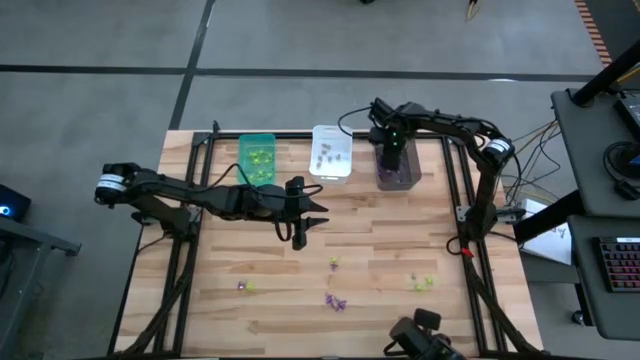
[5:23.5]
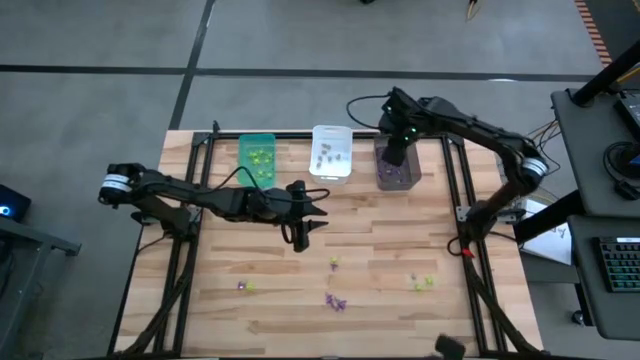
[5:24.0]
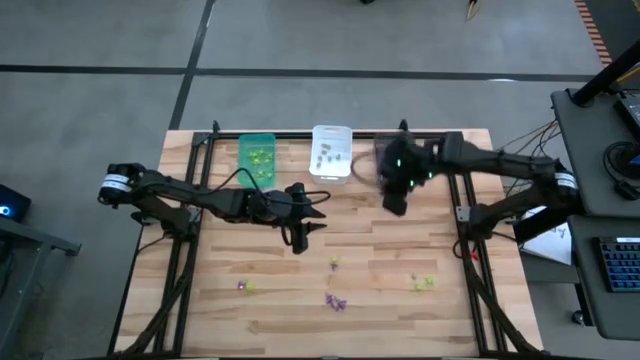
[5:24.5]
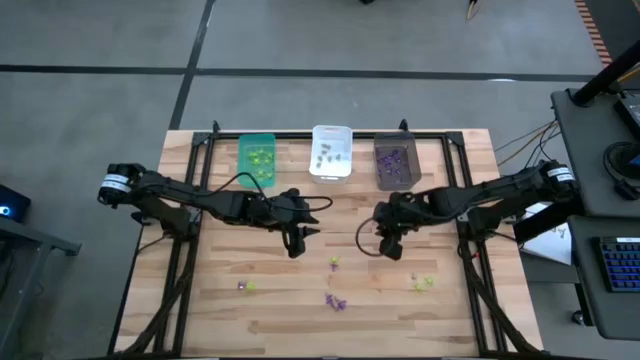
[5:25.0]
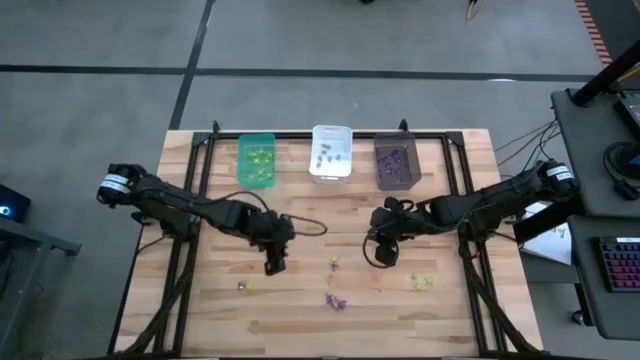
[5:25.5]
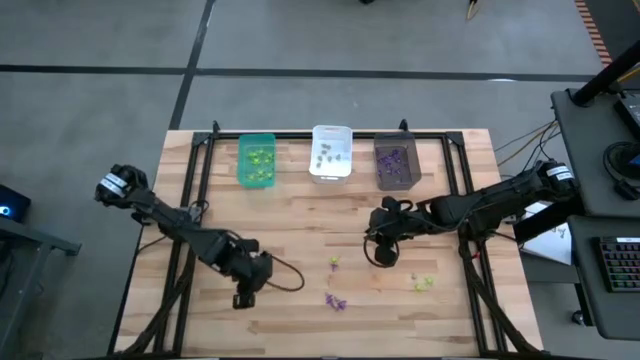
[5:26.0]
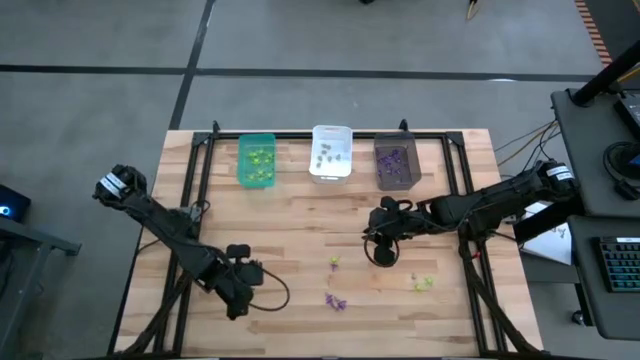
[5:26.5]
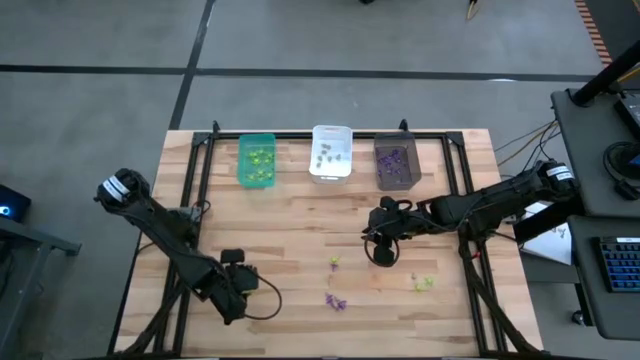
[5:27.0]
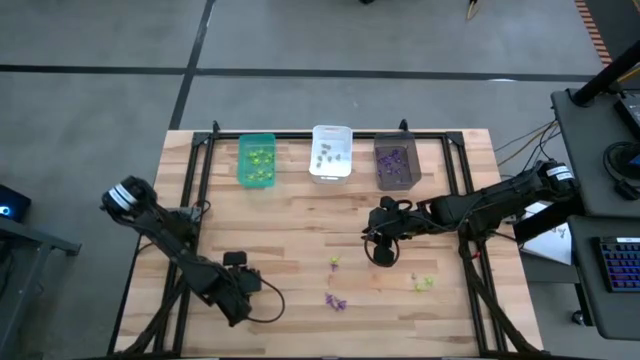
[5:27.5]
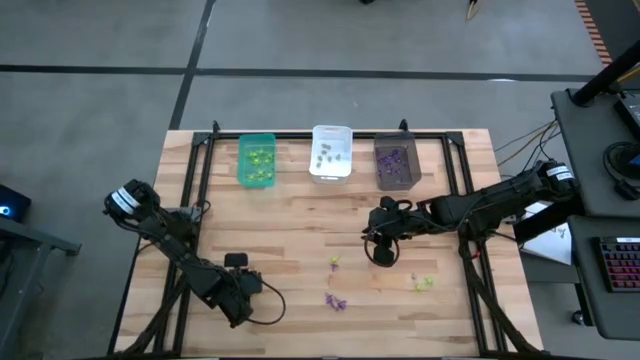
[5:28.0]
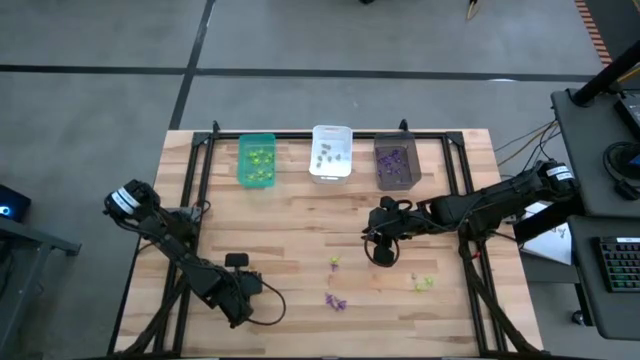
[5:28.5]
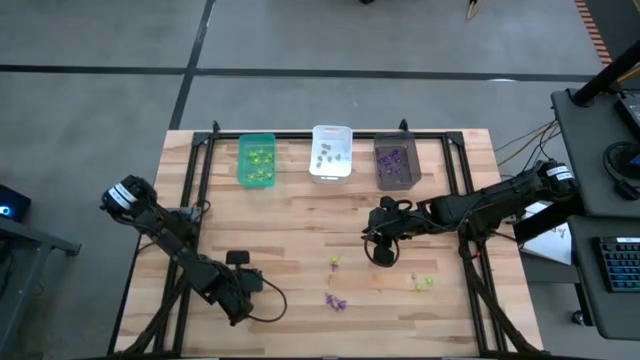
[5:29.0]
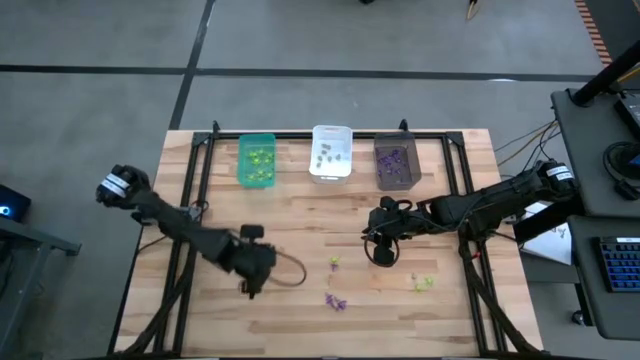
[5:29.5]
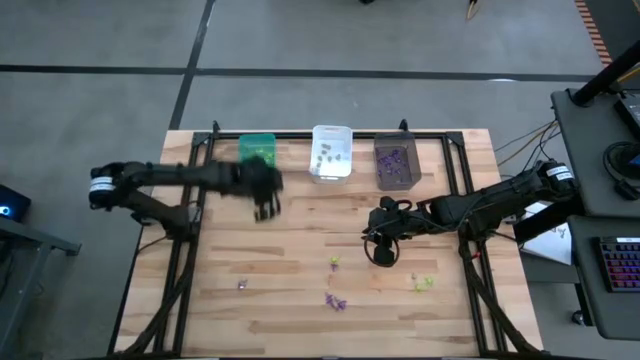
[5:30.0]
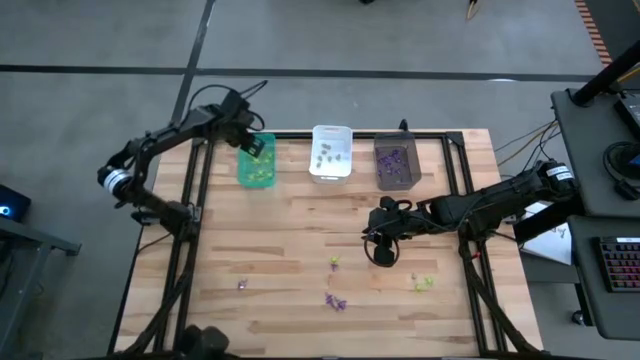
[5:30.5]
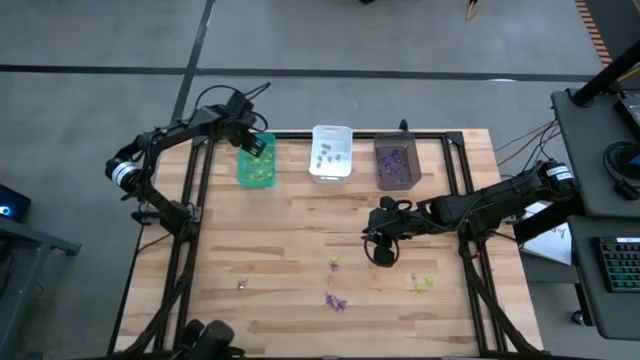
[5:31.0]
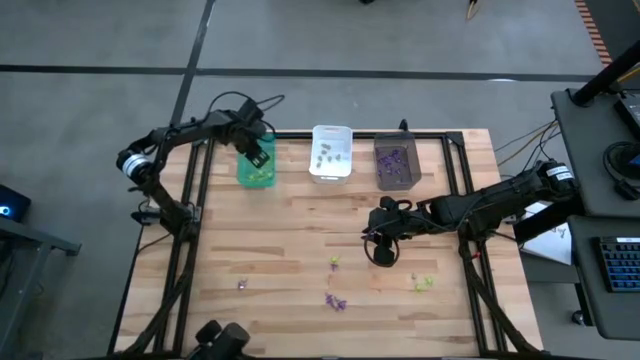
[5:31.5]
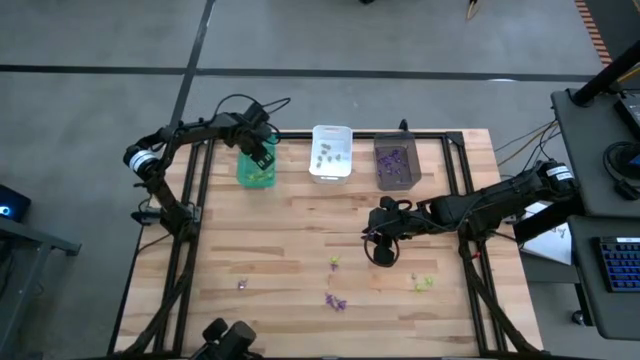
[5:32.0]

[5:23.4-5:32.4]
Task: Sort Halloween decoration
Put the green spider toy into the blue bin

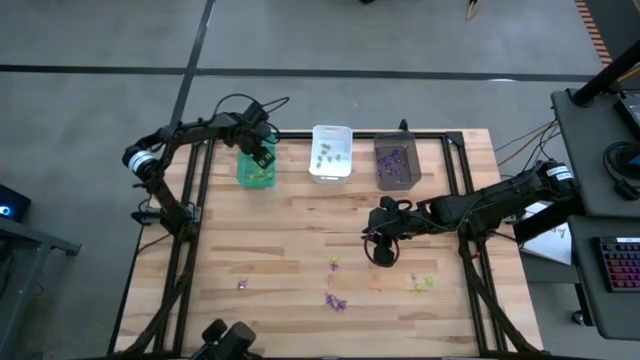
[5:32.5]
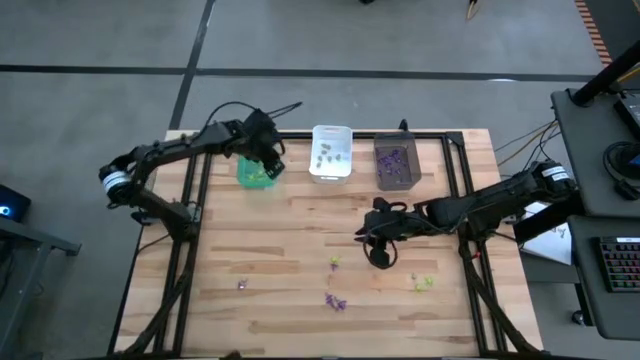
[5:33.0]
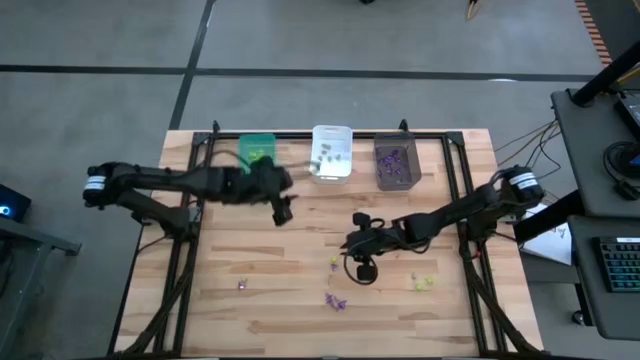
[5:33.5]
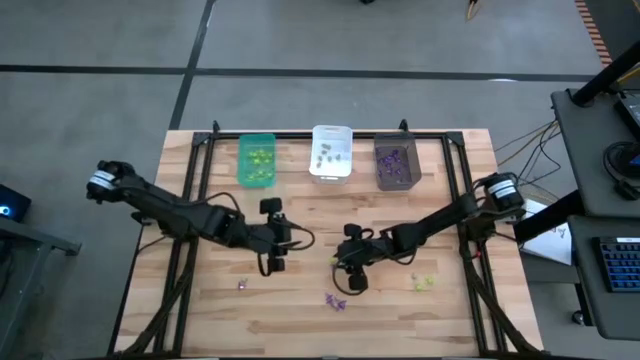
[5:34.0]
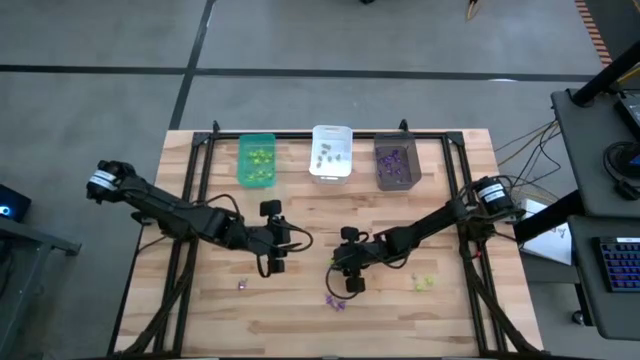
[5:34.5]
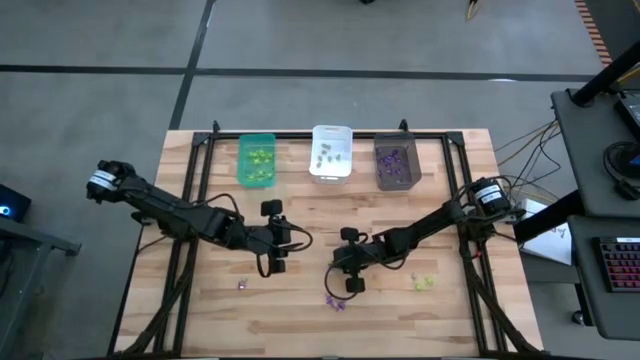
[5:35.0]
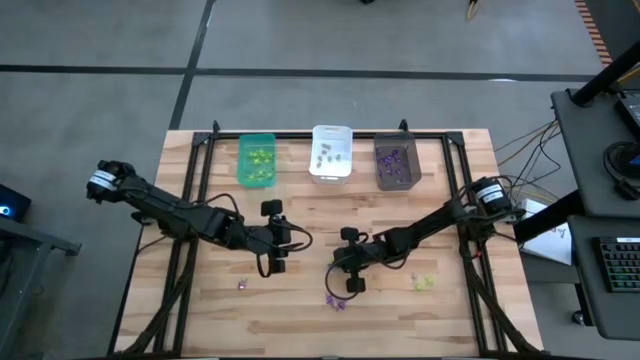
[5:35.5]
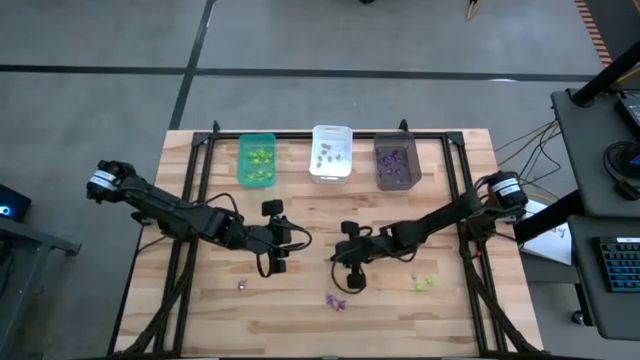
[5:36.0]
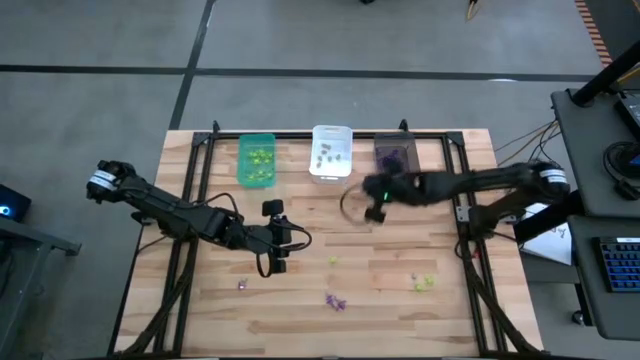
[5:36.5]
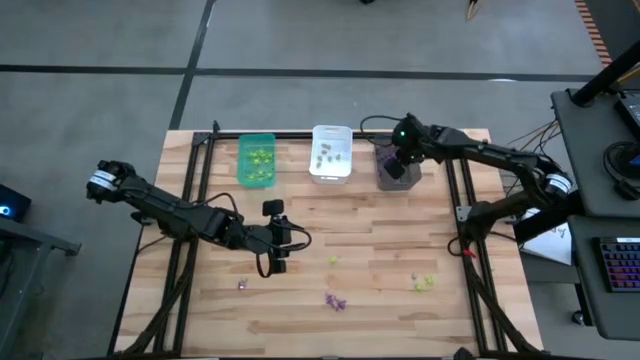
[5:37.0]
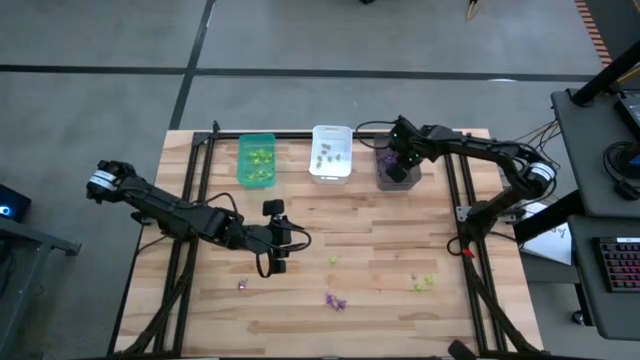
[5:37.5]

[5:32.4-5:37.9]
Put the purple witch hat toy into the gray bin

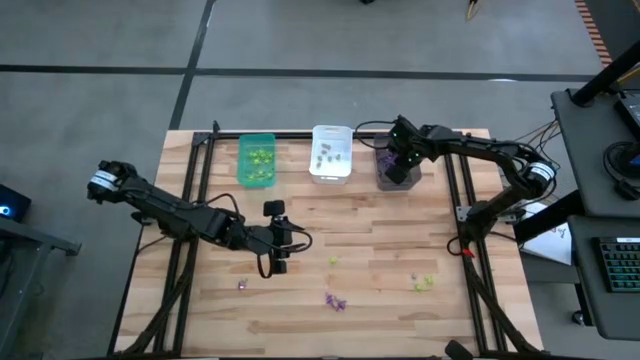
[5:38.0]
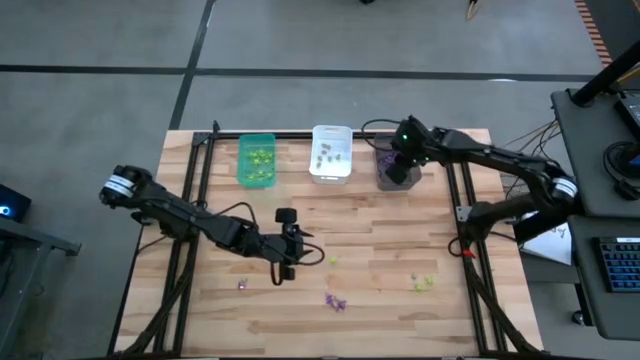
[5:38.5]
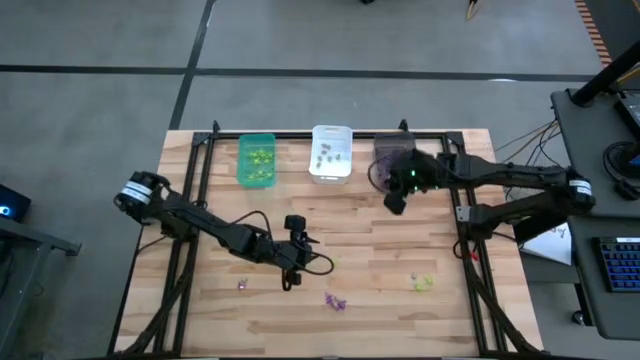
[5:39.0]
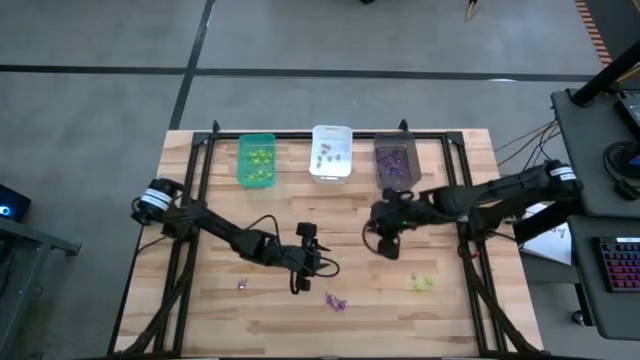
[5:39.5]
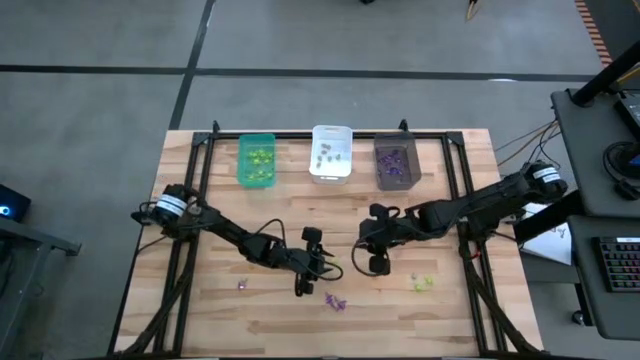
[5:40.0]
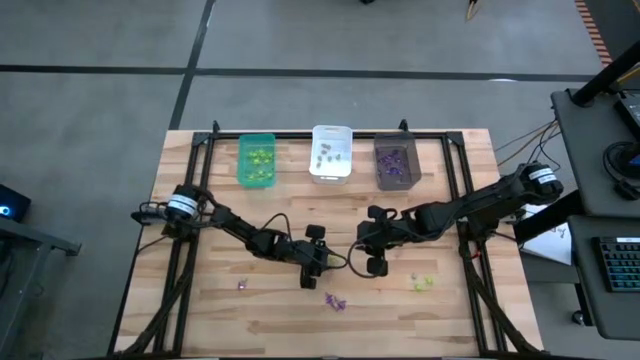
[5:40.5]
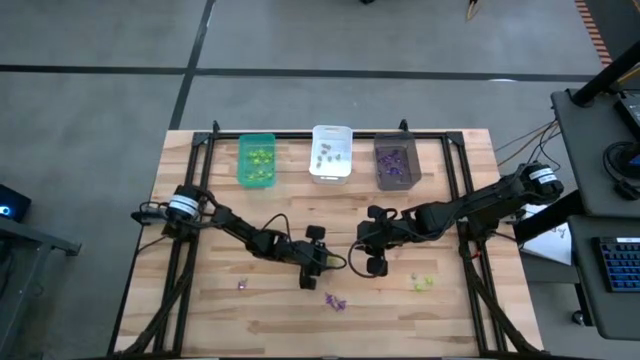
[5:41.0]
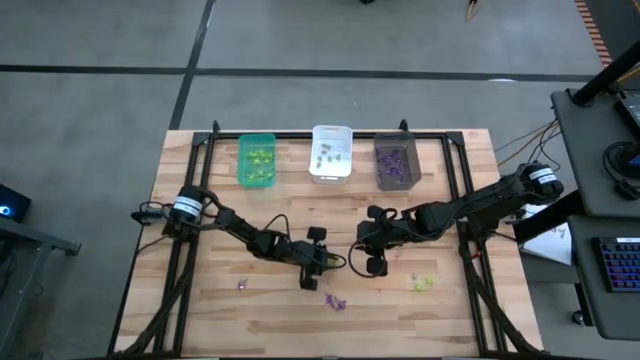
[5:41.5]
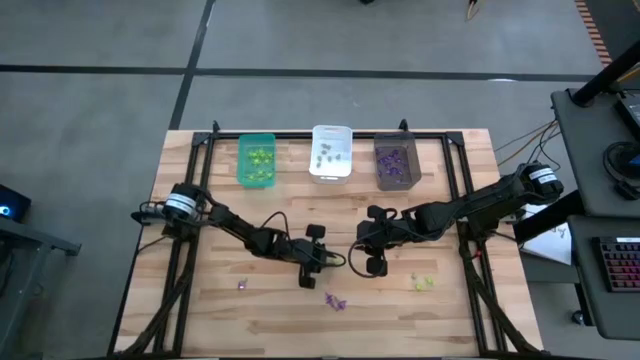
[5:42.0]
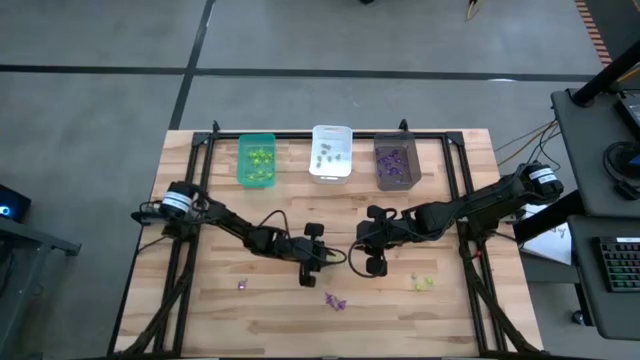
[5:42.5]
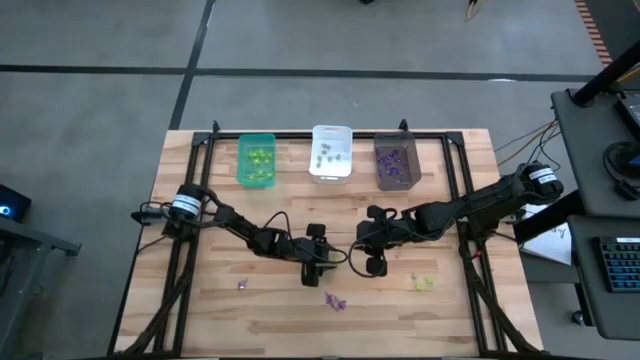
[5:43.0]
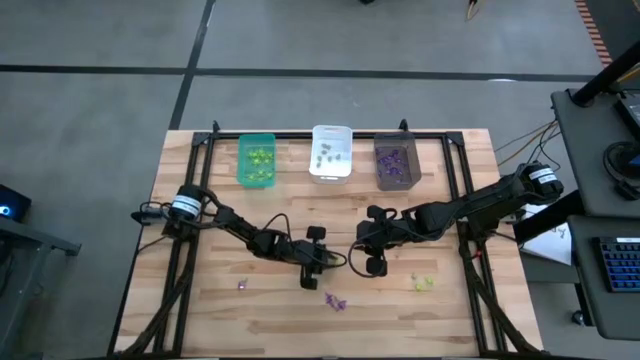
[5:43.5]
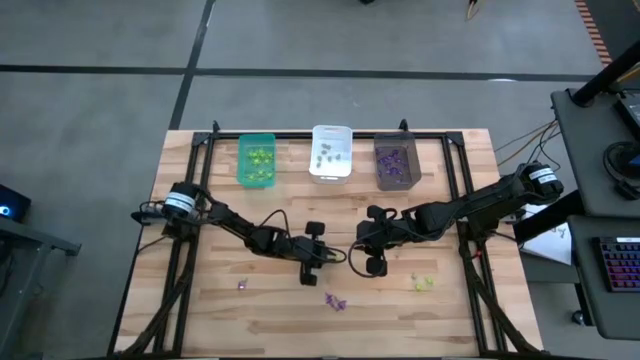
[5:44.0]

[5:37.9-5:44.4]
Put the green spider toy into the blue bin
